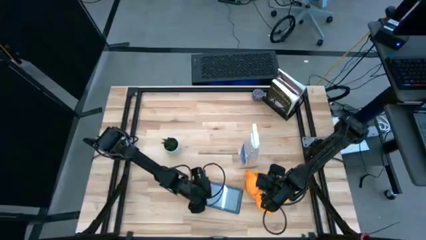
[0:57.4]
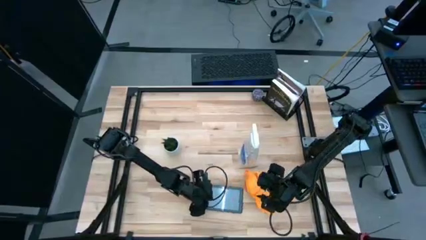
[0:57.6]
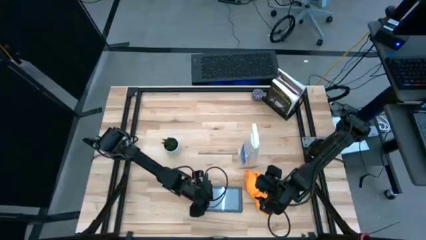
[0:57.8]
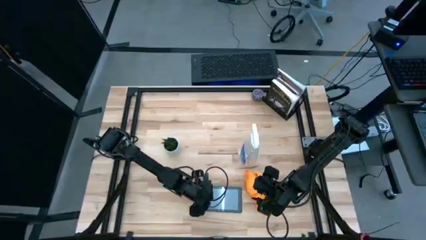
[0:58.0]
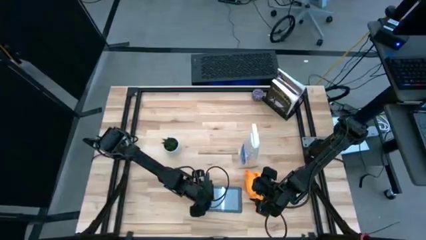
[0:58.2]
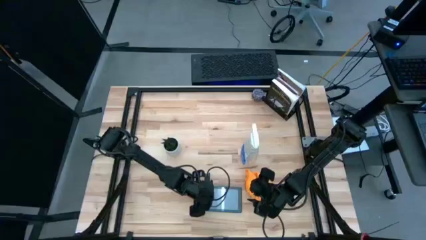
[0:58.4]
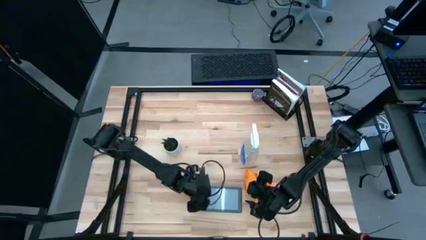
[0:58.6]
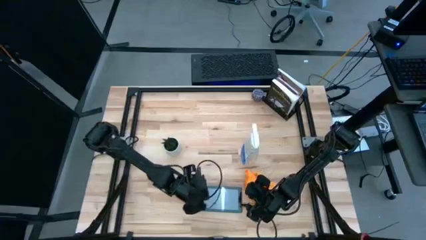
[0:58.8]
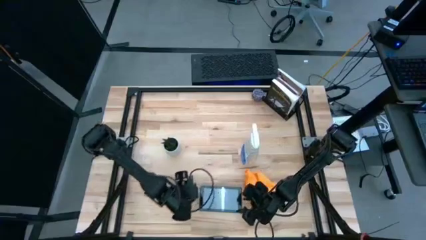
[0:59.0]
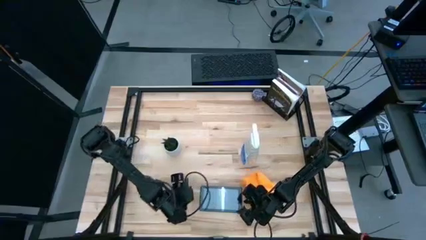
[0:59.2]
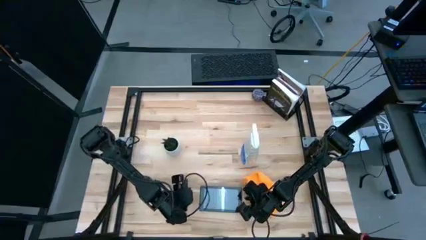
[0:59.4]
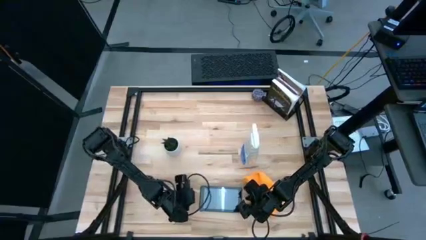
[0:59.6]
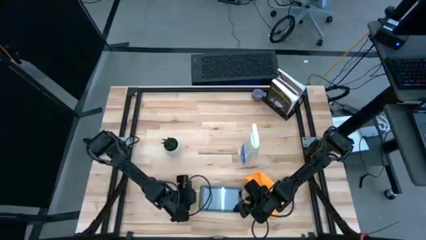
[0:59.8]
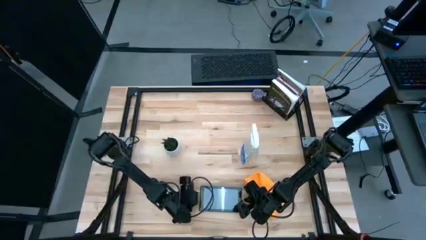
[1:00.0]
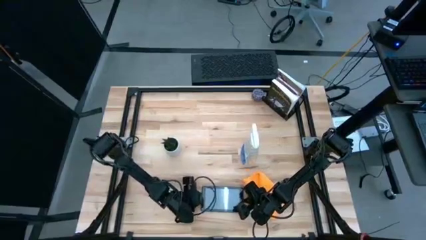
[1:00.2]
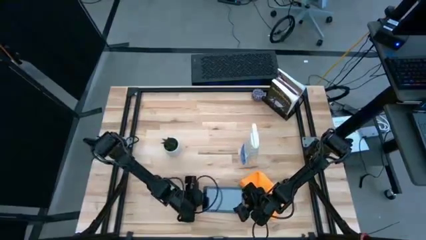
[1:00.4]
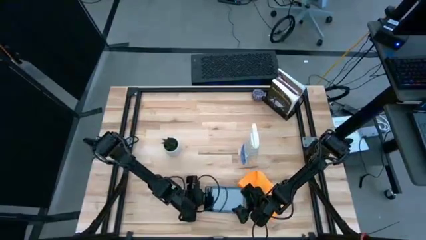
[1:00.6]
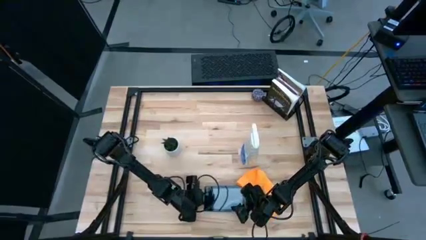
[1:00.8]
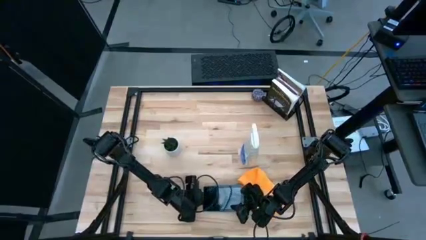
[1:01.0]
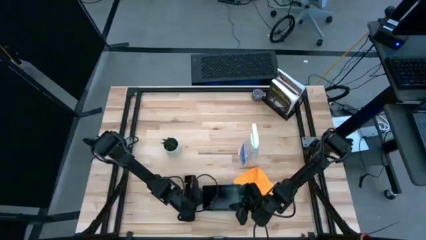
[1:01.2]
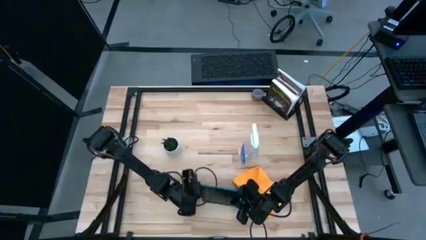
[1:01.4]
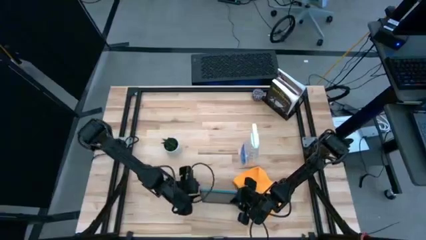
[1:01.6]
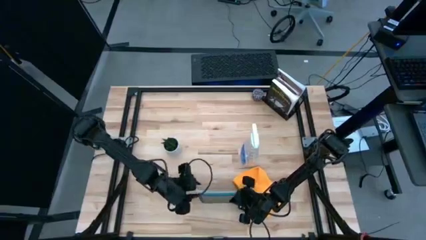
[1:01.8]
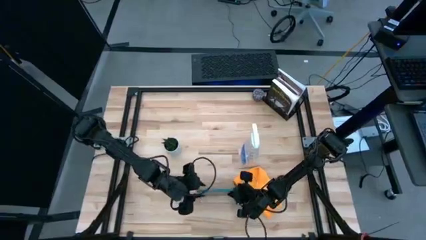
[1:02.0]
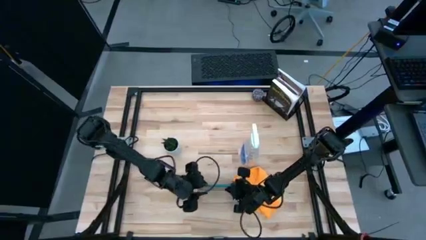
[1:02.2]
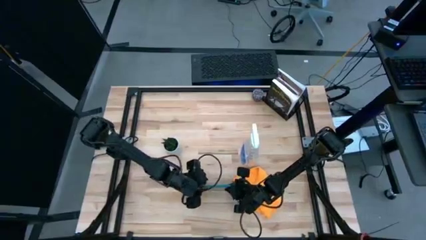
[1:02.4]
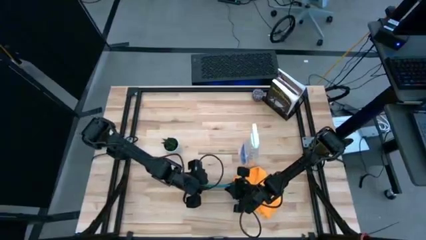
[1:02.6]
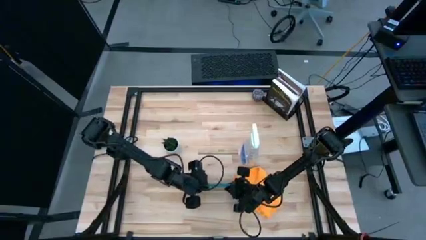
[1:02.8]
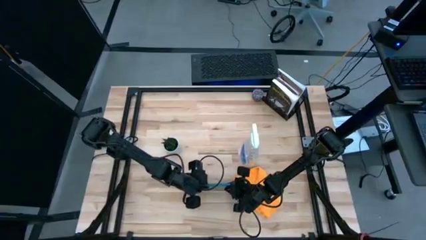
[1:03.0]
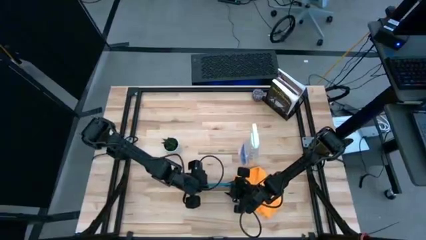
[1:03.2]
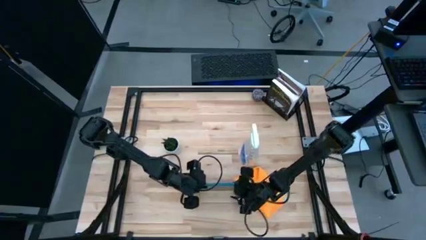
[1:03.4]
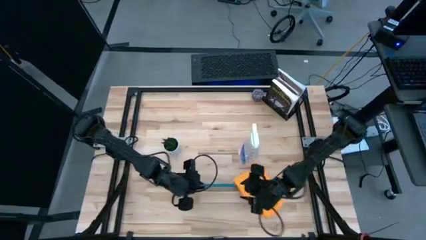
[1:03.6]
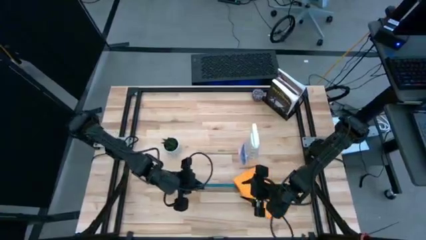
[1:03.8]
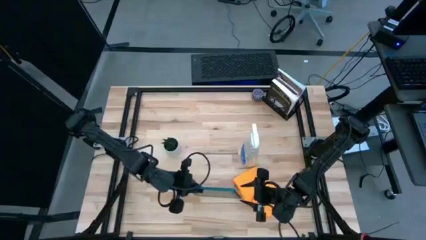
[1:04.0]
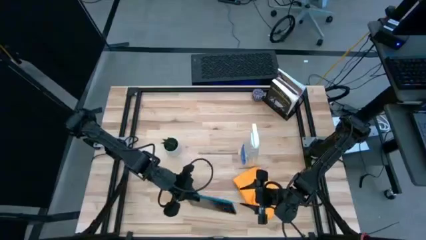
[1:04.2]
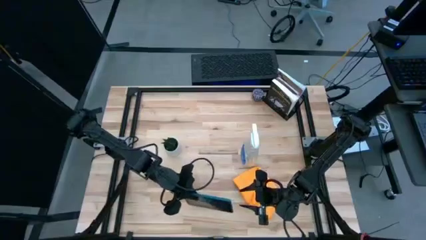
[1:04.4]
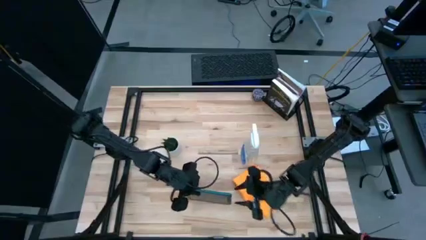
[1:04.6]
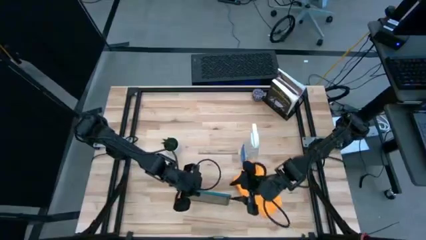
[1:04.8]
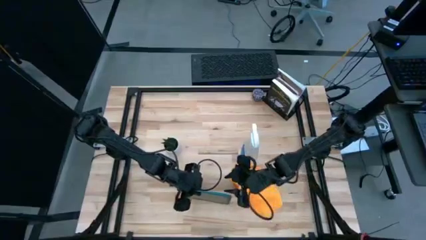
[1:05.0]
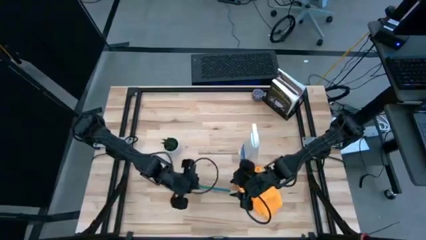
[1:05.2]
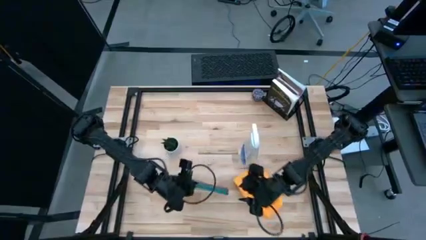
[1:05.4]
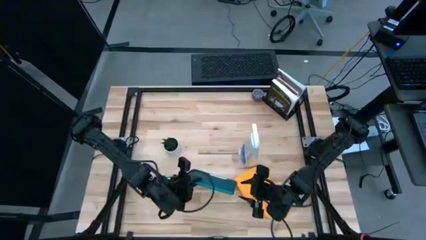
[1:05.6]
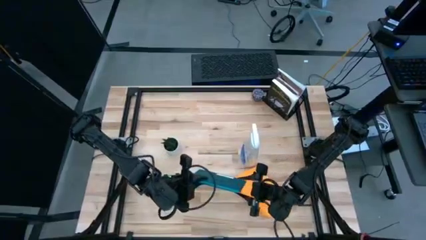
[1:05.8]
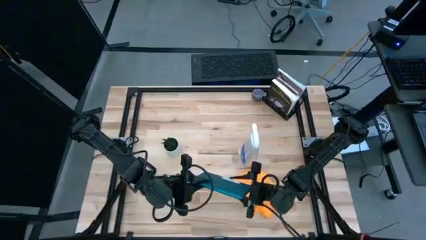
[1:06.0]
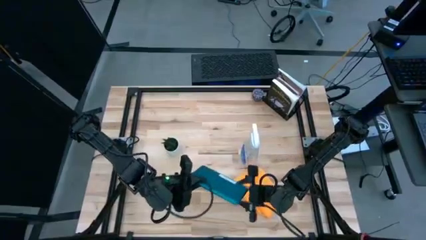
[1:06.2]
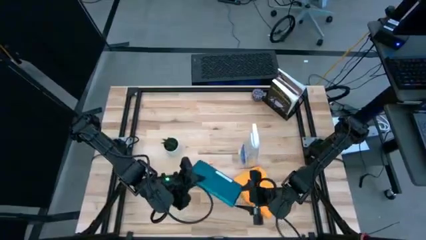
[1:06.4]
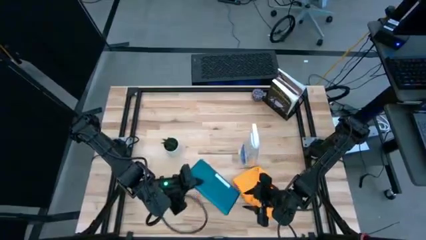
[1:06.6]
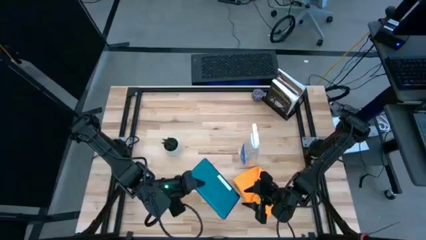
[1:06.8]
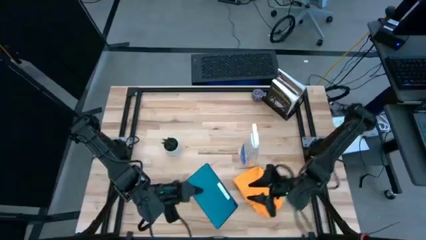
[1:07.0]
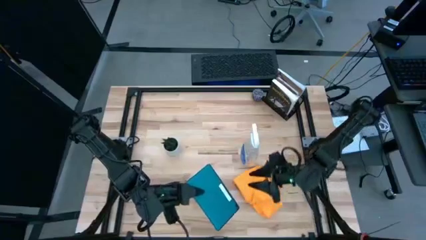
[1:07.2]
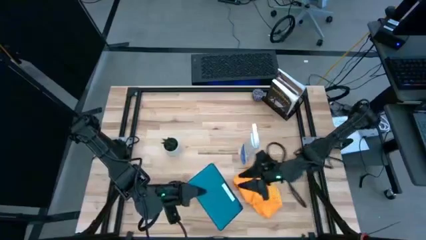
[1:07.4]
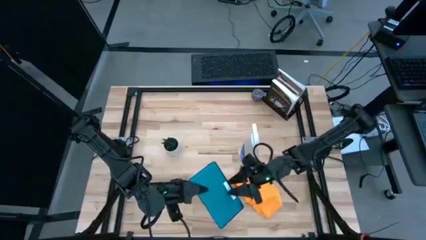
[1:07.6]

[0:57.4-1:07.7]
Task: Apply microfiber cloth
Spray the back of tablet using the spray bottle

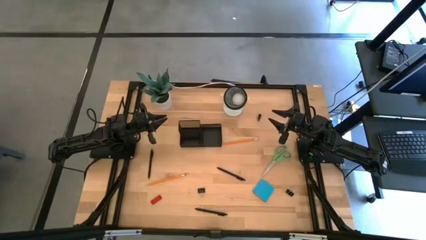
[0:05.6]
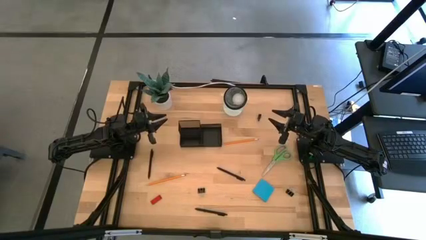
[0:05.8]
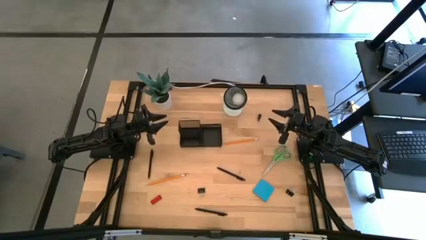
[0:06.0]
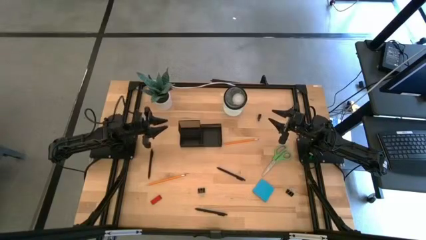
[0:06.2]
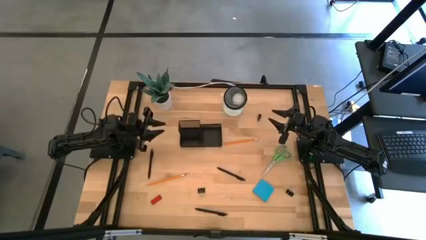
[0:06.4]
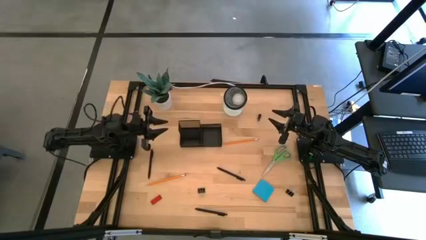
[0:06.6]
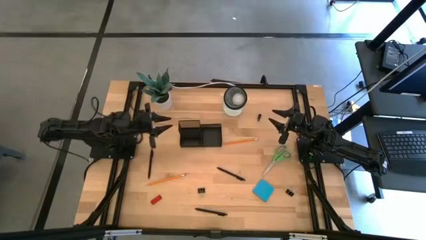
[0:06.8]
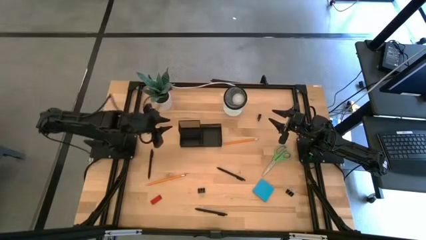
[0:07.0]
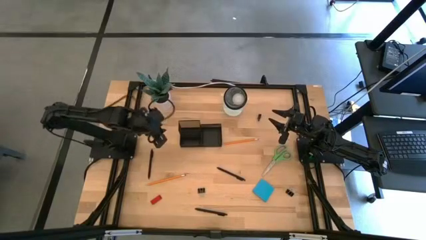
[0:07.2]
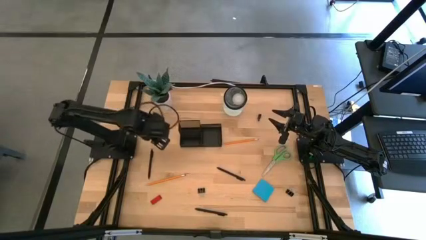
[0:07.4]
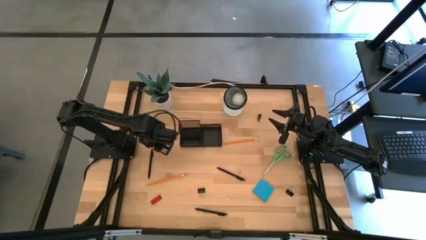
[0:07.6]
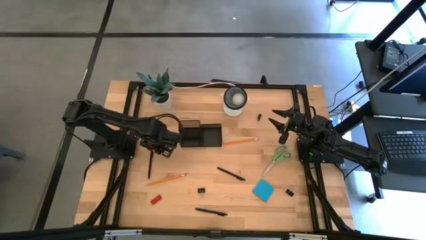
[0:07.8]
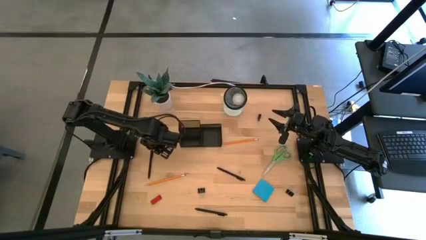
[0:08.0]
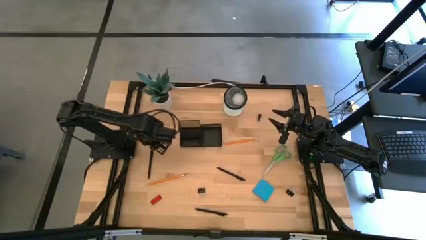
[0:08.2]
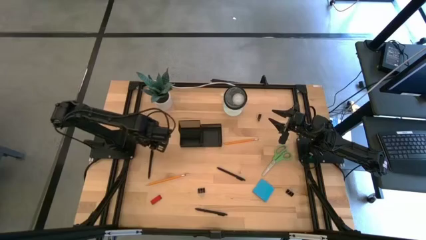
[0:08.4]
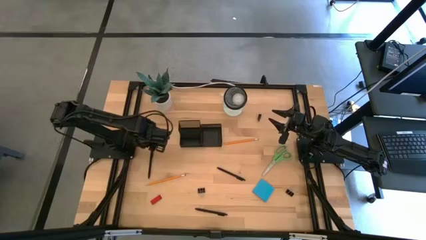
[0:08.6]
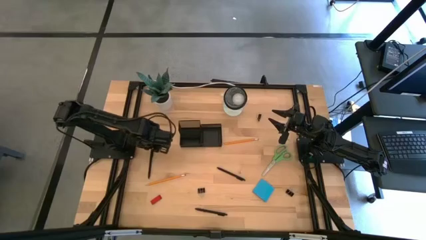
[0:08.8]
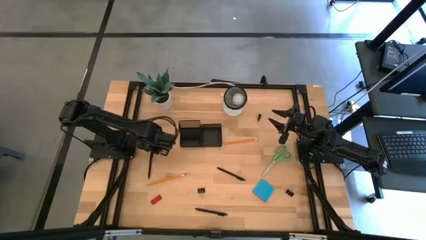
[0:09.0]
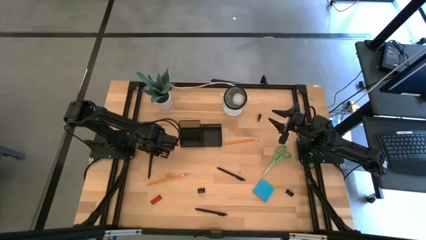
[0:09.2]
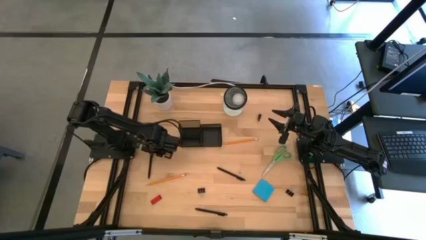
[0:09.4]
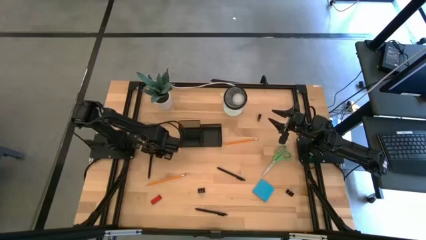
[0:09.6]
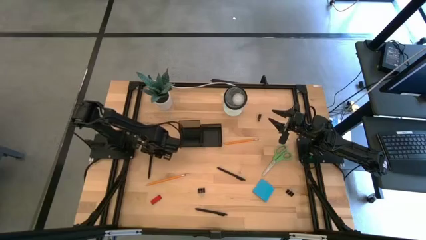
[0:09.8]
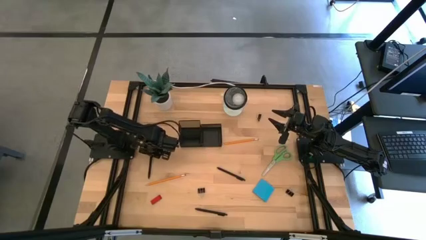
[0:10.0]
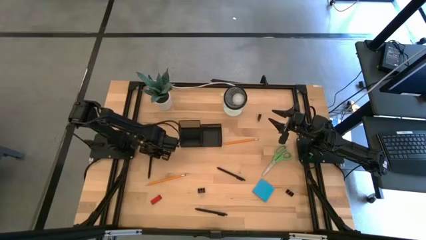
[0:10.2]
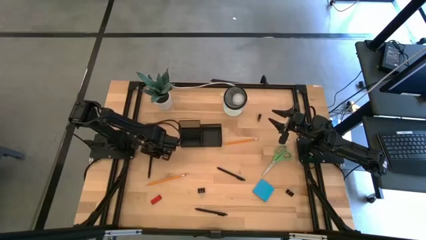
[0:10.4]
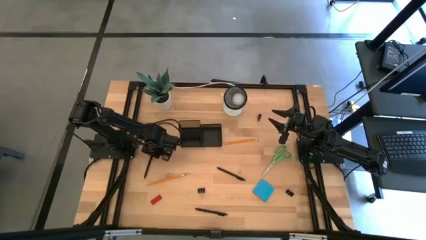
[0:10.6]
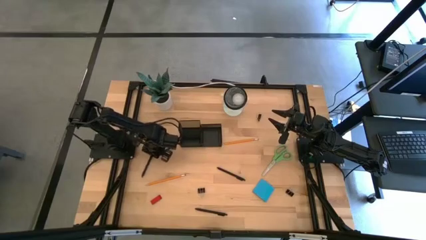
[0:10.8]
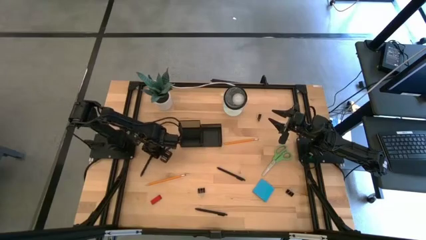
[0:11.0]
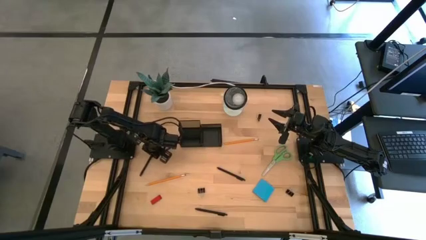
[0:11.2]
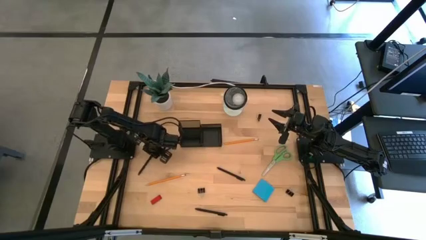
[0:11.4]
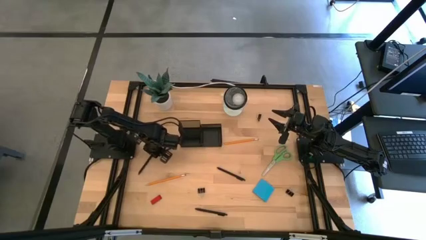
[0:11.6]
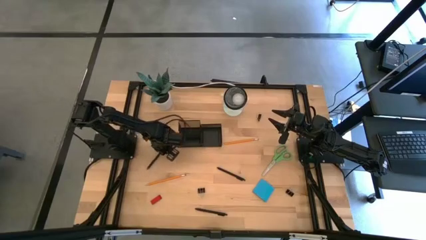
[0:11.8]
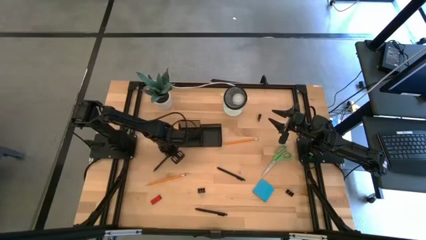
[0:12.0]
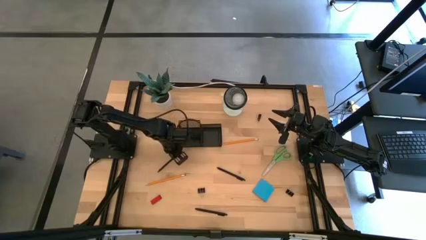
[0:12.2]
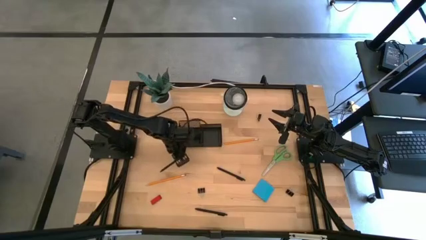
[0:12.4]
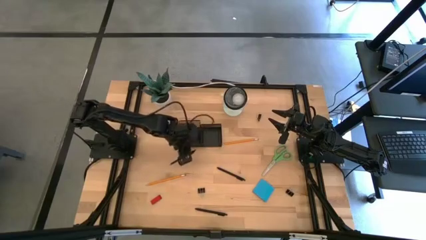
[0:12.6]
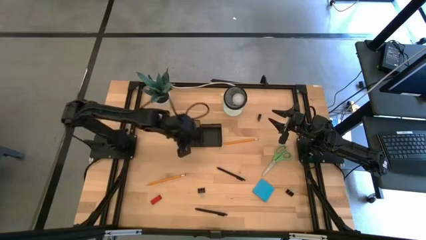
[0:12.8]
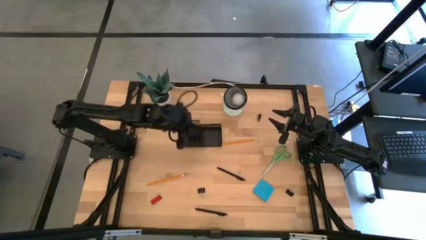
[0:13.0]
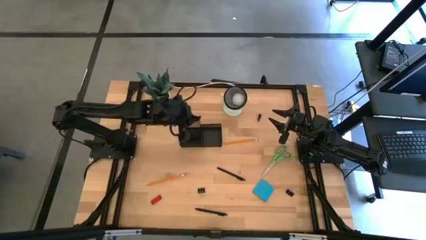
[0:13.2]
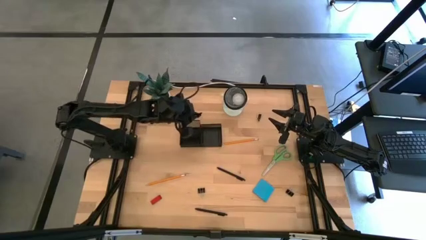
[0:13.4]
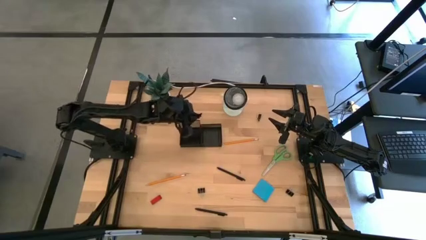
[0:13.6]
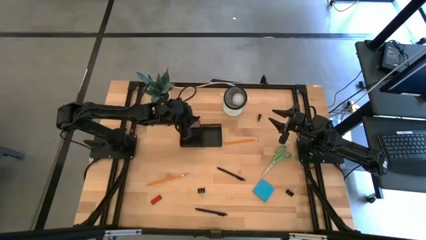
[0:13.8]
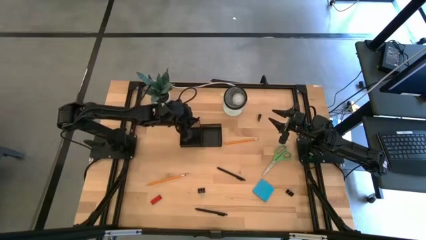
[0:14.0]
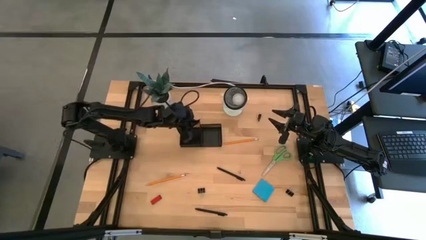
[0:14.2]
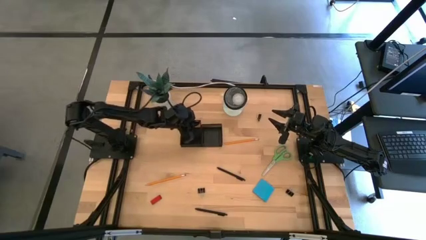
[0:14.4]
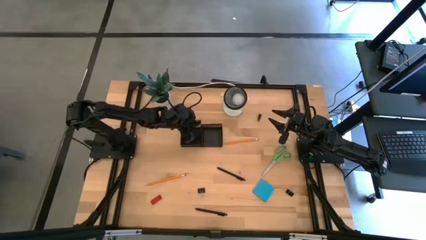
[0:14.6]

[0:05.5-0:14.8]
Task: Pick and place office supplies into organizer
Put the top left black pen in the desk organizer
